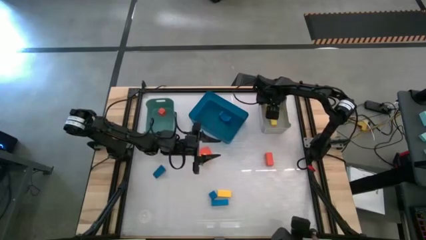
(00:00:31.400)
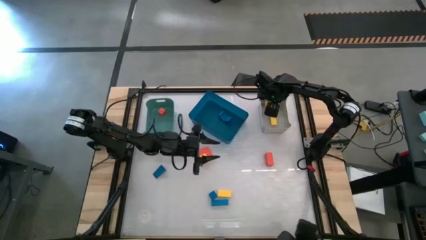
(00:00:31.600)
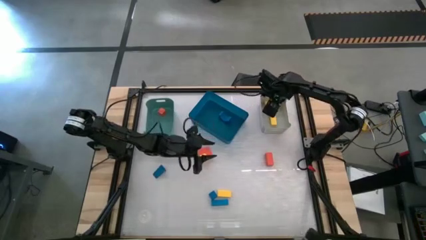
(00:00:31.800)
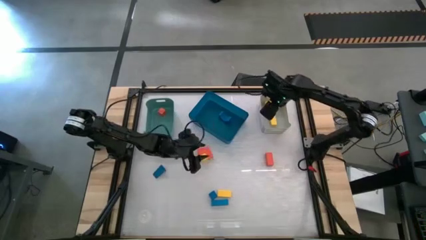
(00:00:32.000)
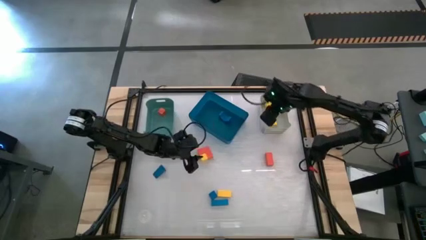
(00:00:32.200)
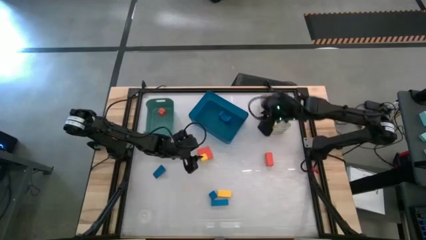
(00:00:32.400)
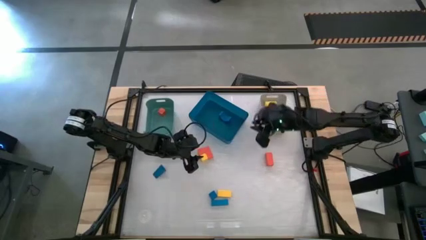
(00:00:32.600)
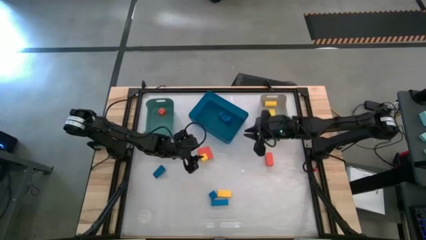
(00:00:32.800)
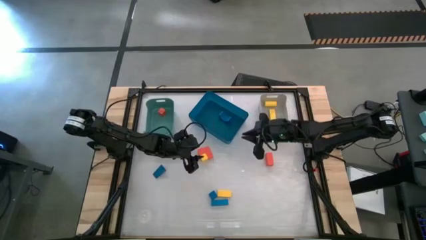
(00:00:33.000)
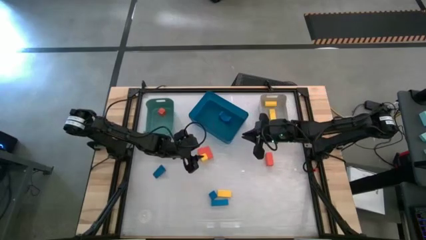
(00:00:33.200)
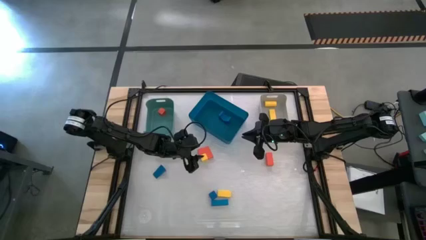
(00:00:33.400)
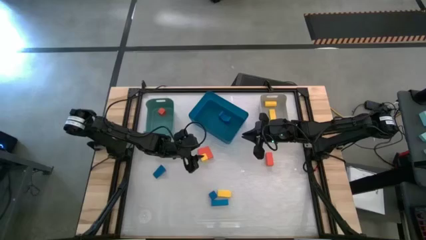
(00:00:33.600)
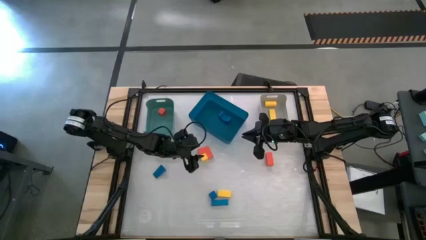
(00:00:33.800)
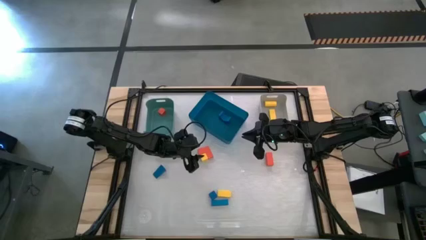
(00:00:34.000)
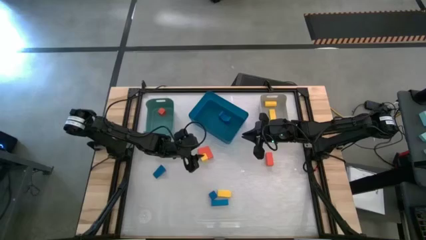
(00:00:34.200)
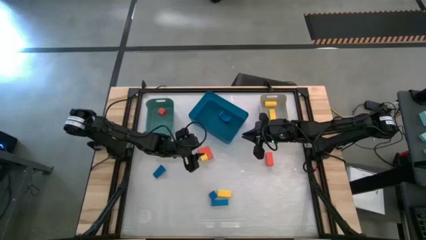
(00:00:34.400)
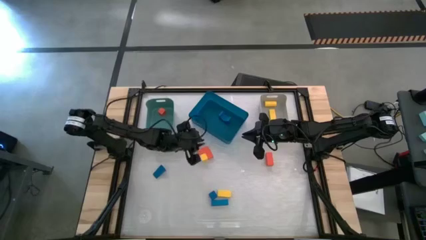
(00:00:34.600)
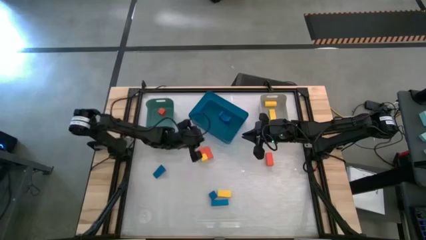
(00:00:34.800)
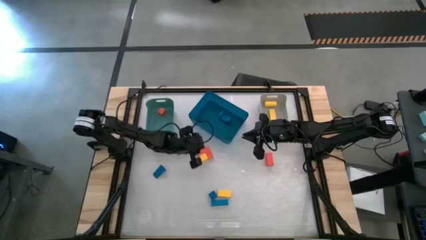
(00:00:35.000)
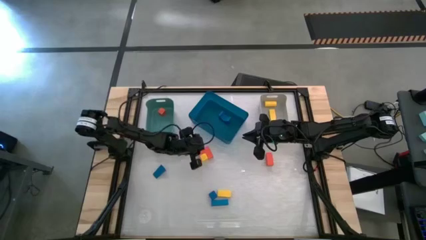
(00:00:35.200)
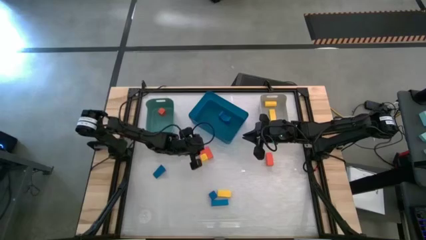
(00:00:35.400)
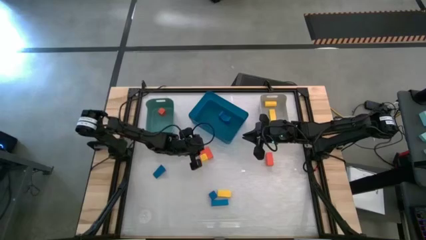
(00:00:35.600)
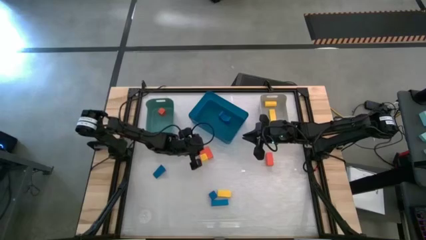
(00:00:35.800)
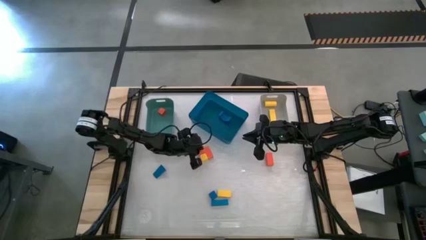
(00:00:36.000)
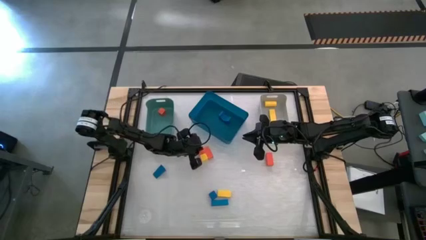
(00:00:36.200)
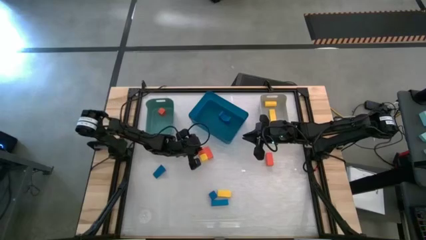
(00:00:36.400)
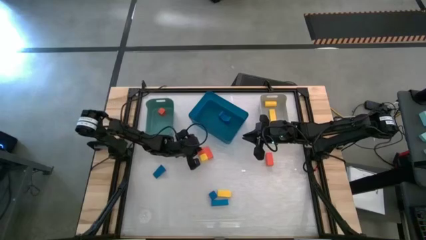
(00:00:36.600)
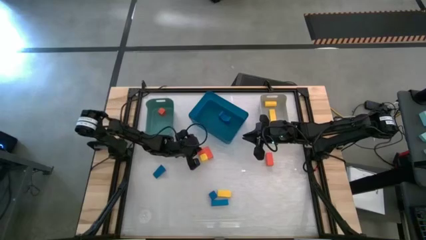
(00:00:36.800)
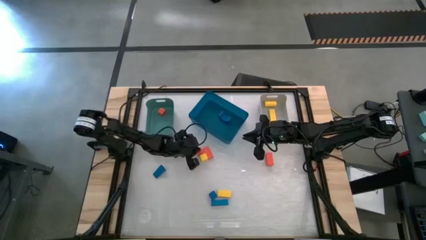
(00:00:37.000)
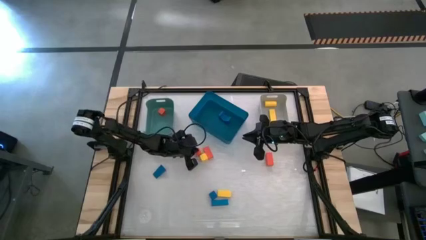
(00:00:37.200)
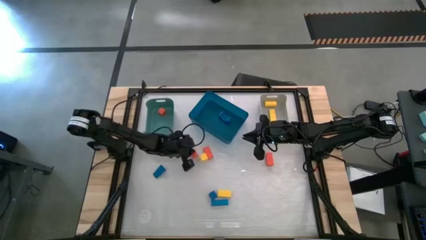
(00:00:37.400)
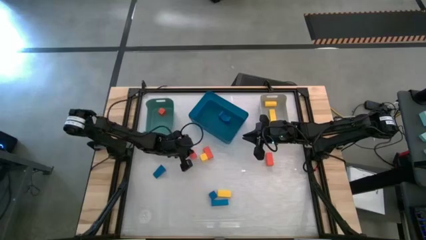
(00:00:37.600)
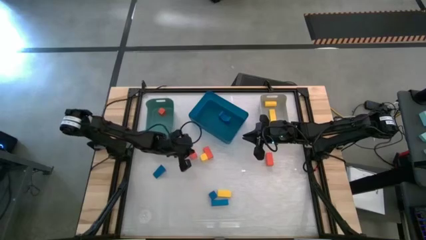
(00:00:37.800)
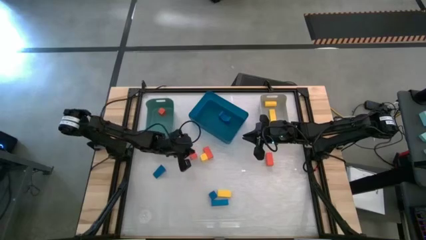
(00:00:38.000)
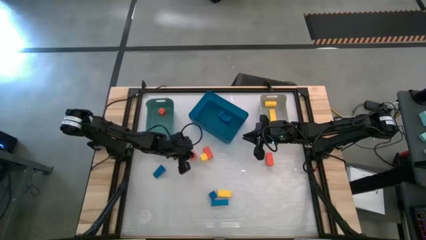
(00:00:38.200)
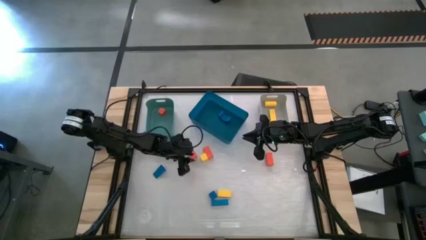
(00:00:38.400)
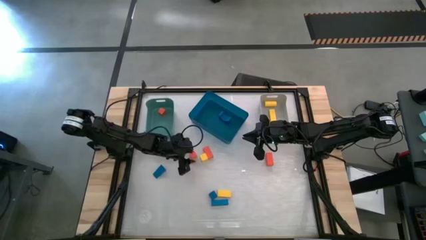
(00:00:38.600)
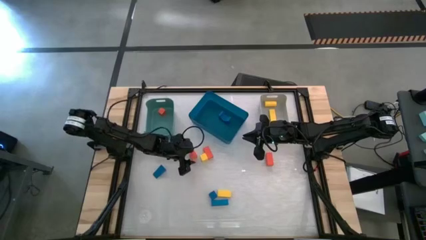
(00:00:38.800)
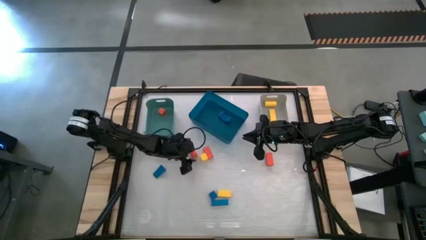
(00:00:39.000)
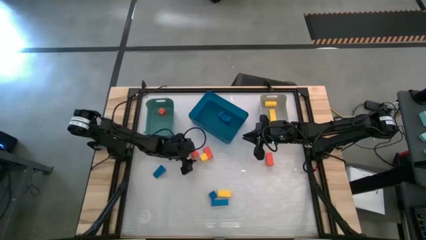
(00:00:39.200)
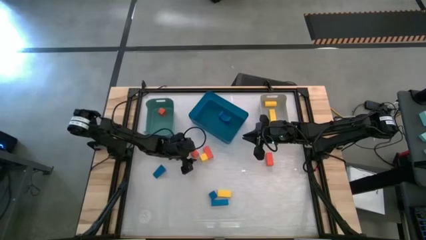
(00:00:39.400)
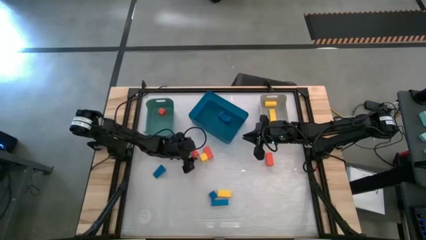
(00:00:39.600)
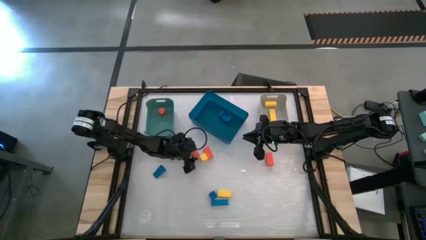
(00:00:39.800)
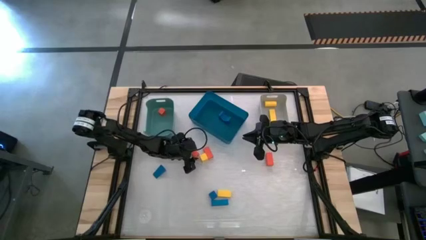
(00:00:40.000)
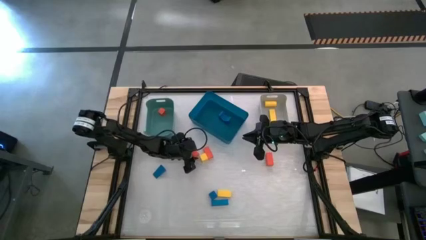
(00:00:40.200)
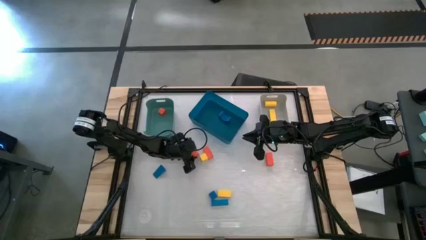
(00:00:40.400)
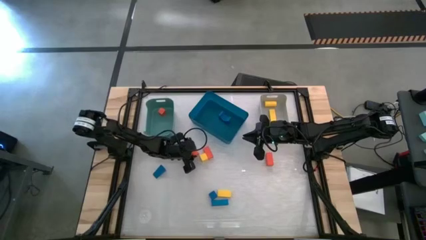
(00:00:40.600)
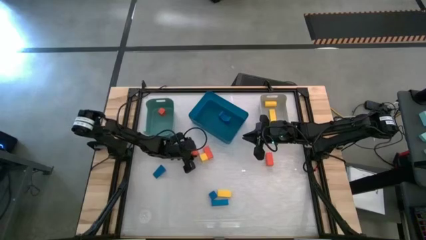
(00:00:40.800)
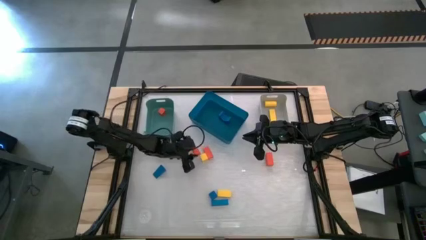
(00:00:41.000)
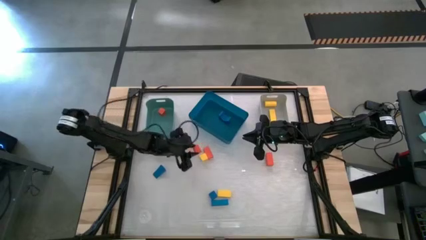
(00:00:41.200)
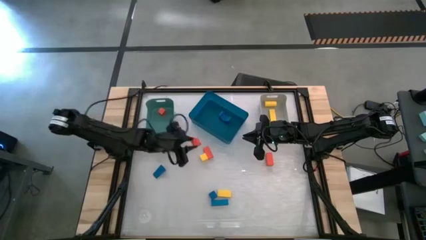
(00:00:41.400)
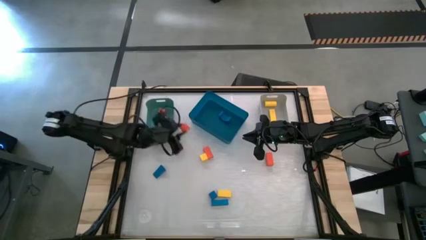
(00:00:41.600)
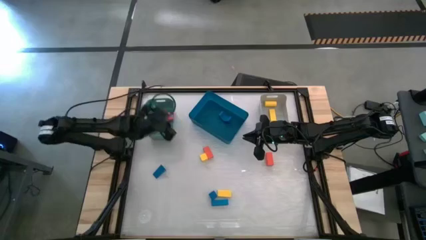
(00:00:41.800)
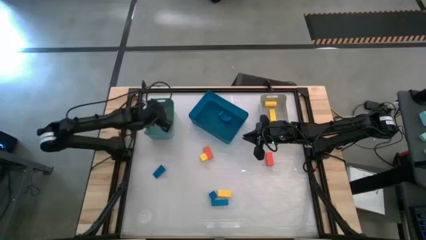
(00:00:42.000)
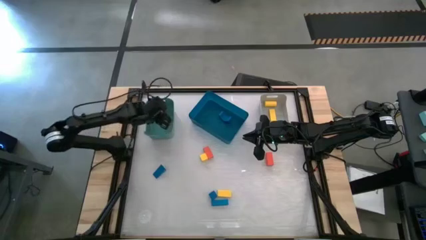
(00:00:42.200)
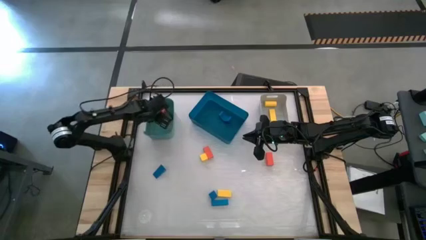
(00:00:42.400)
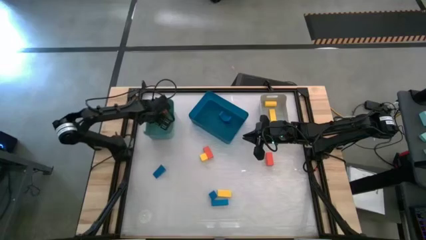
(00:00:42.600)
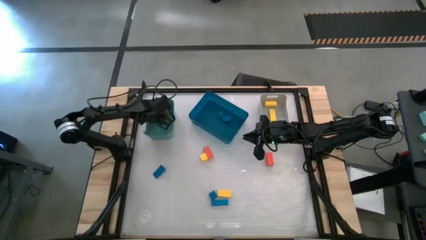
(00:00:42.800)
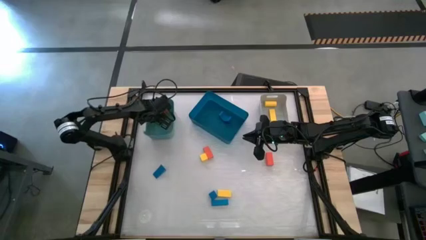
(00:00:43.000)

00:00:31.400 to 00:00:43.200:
Task: Sort & place blocks by color
Put the orange block into the green bin

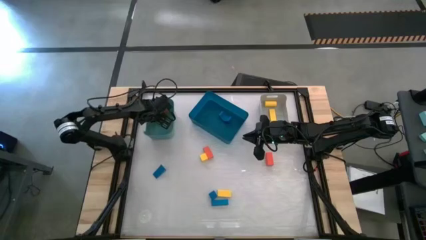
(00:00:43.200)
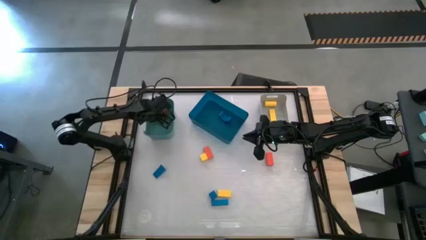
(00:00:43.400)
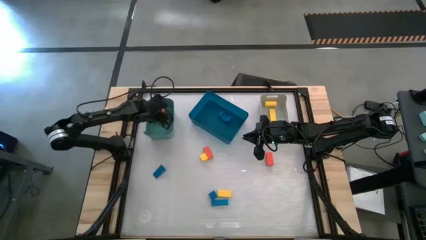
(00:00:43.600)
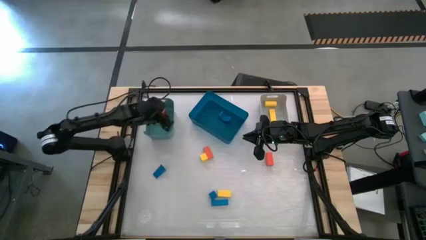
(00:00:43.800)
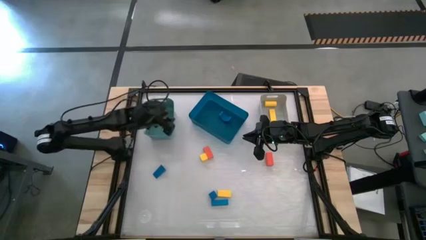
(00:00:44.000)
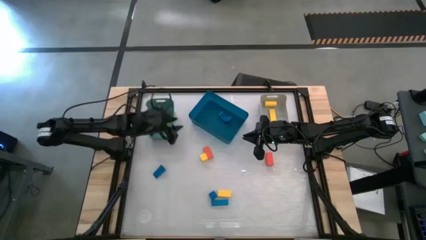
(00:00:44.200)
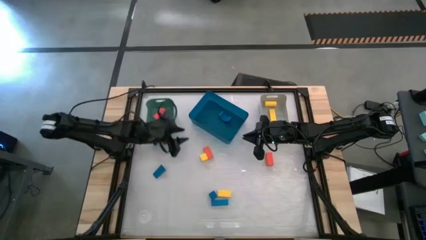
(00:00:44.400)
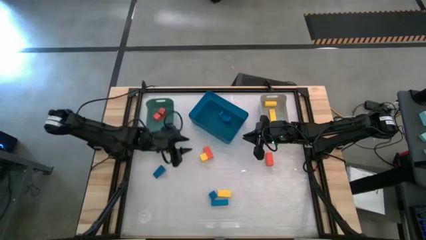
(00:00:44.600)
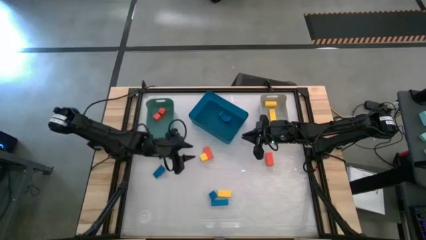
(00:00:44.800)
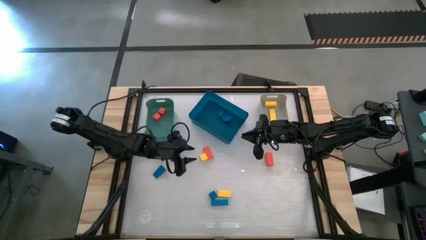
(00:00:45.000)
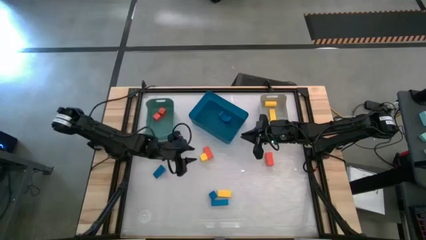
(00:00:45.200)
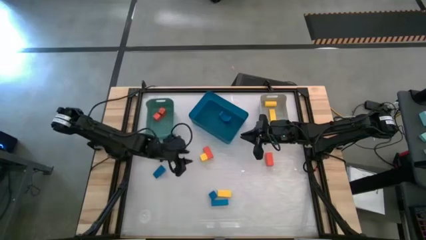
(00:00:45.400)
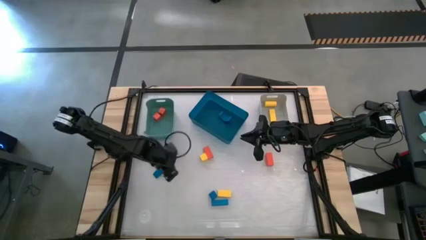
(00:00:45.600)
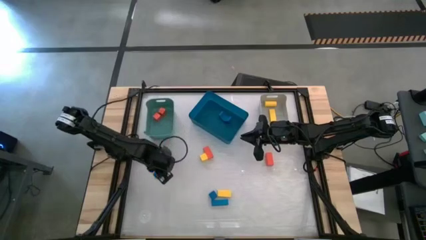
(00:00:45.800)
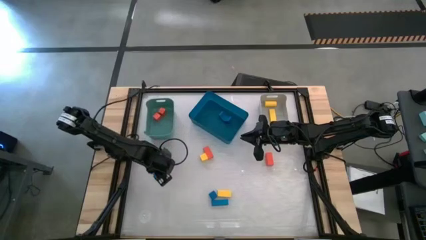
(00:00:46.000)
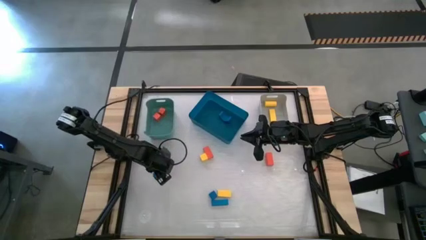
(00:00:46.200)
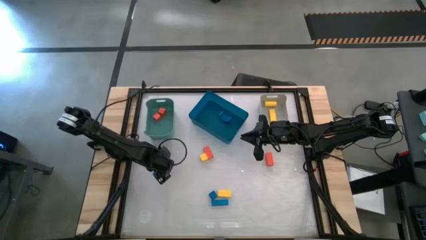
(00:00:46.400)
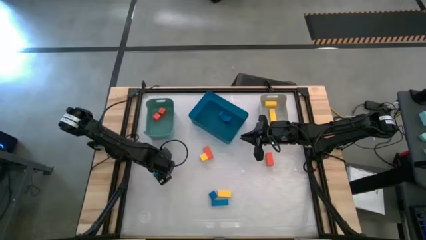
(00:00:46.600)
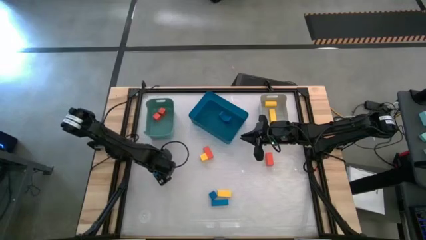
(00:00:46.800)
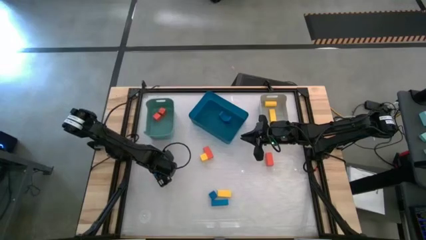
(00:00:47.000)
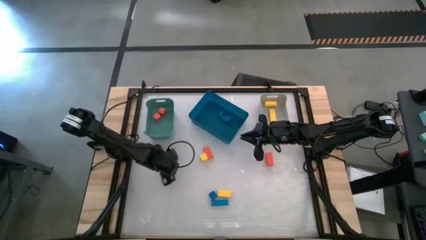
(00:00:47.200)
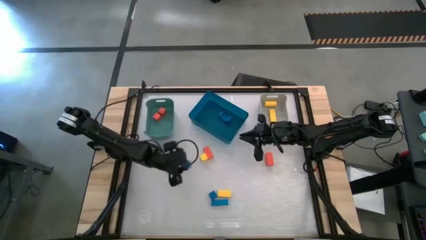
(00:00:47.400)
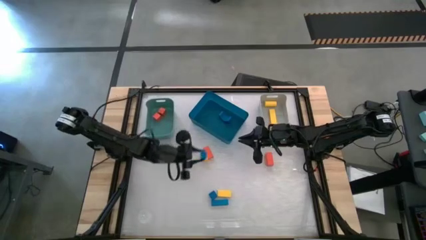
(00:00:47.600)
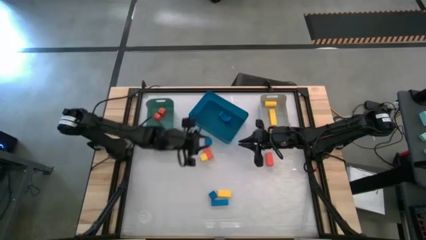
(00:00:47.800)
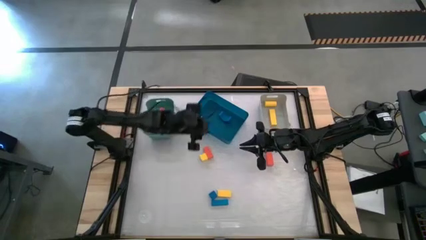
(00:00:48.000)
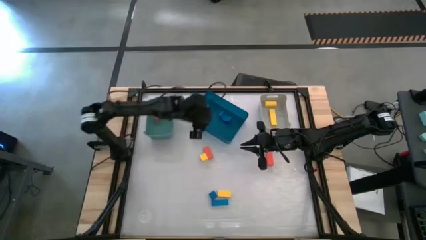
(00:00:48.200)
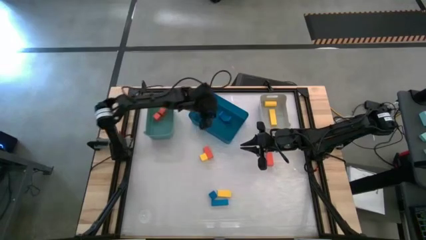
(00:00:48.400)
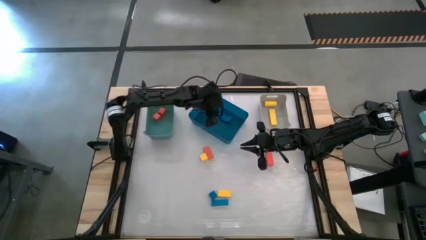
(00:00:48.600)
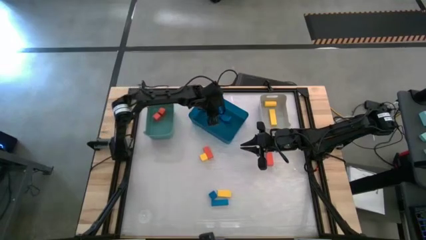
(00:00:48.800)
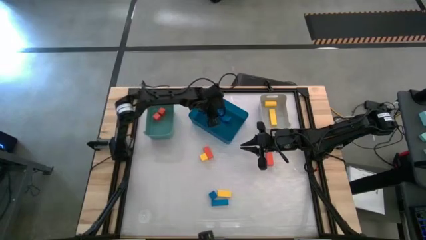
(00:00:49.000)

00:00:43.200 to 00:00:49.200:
Put the blue block into the blue bin
